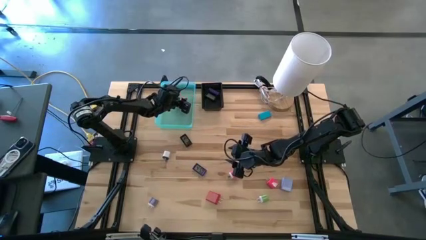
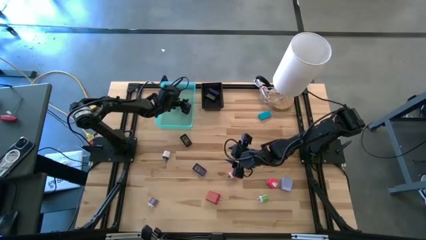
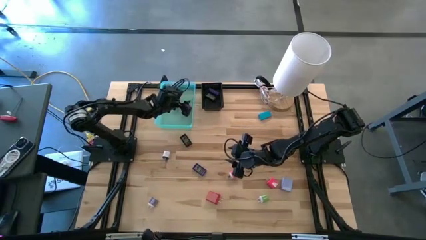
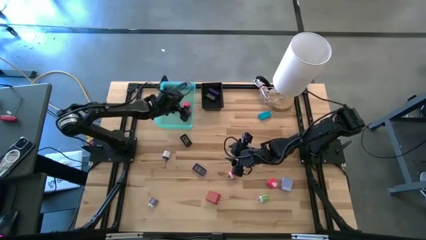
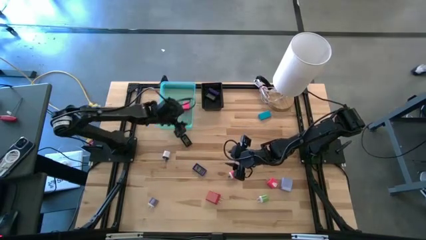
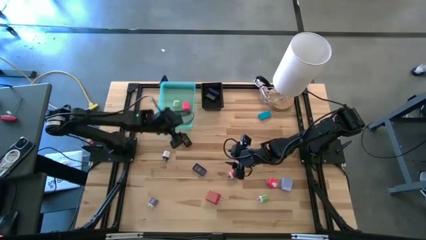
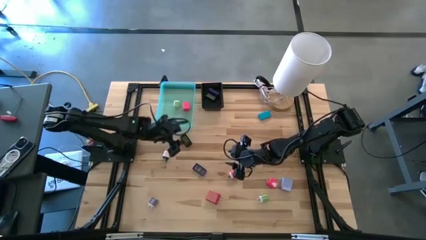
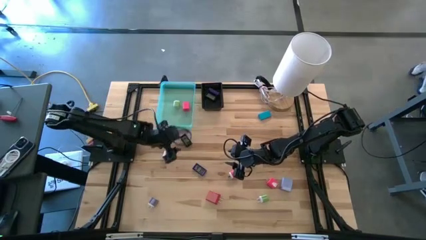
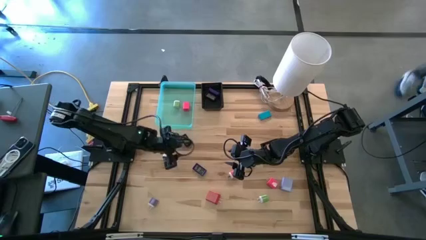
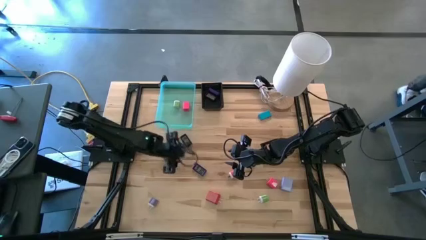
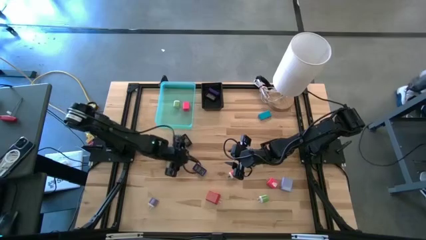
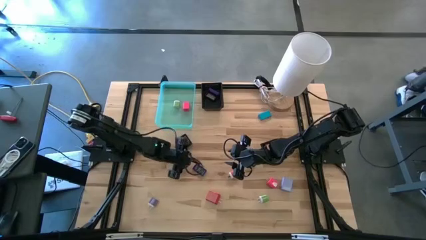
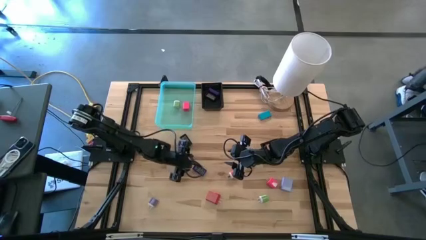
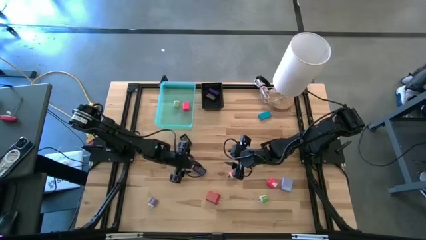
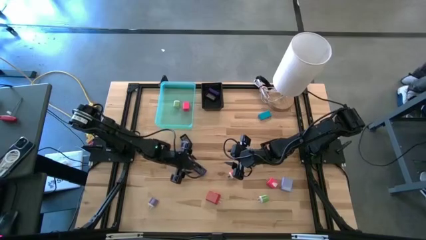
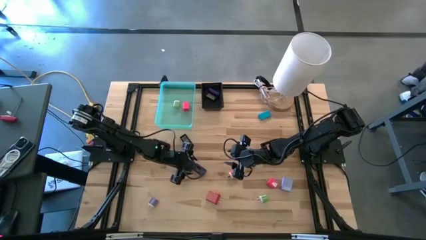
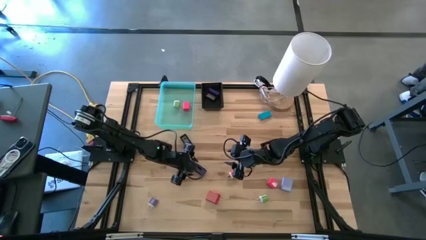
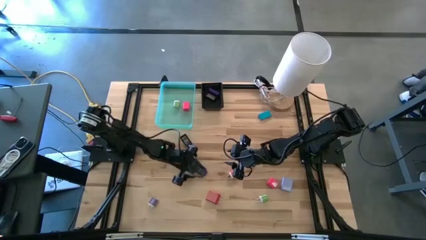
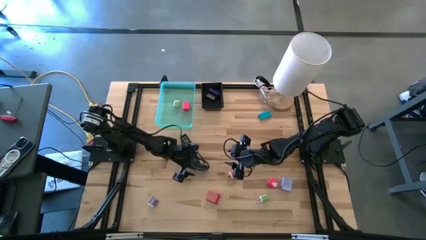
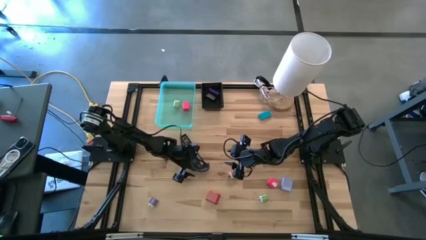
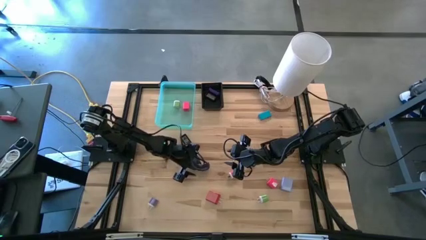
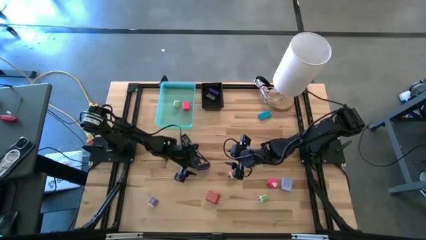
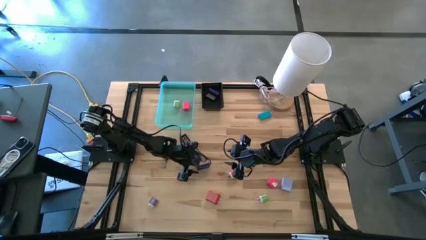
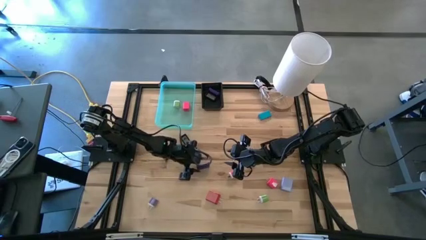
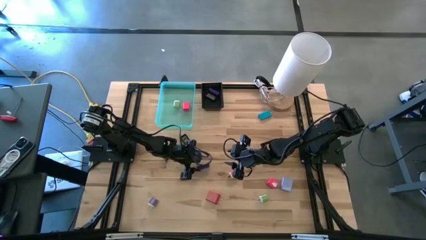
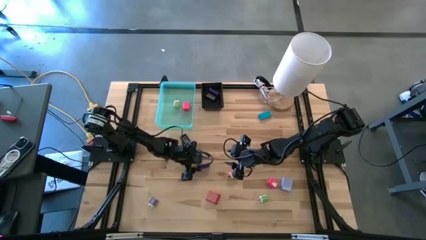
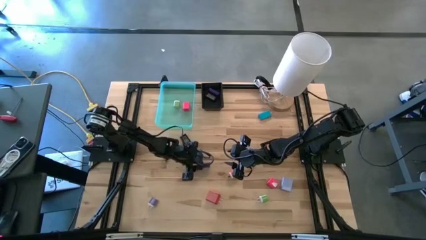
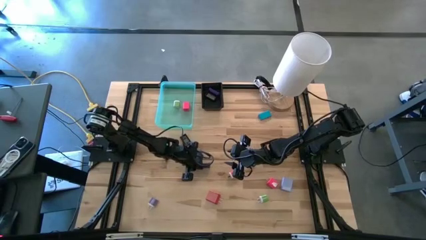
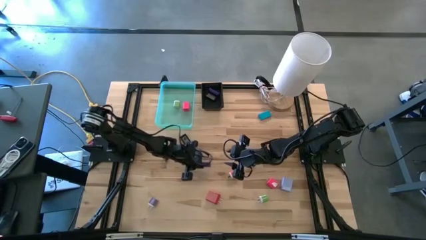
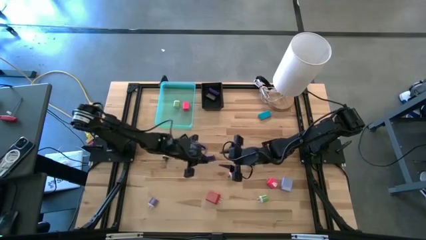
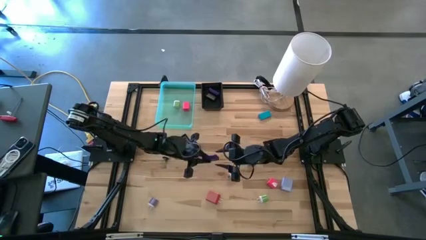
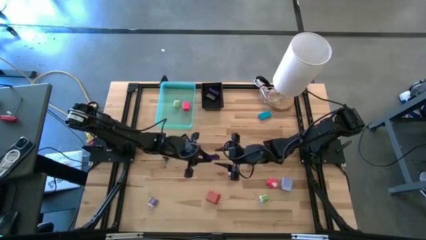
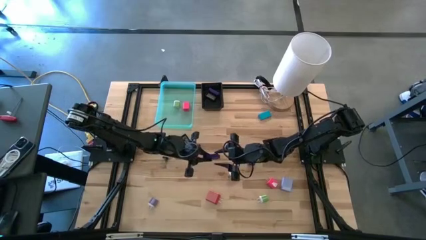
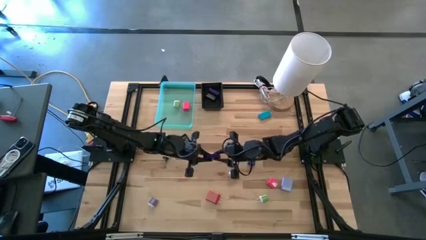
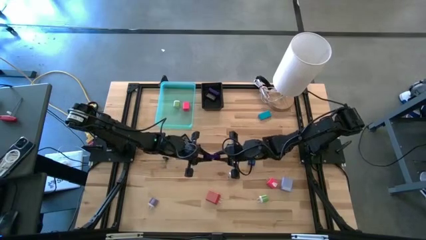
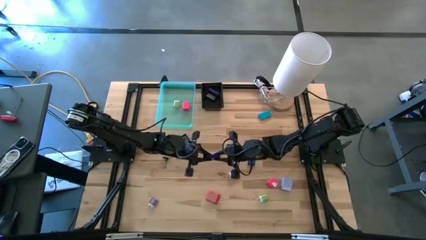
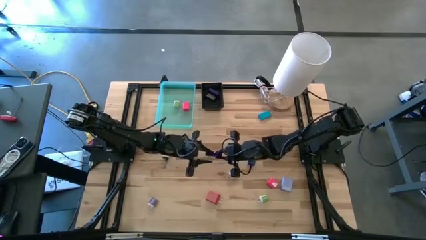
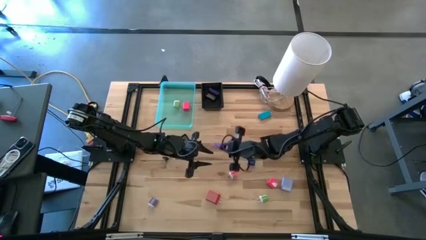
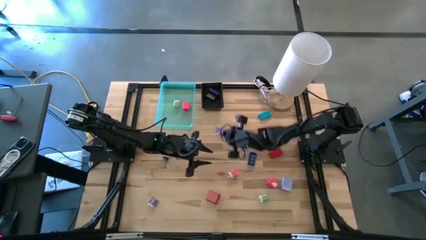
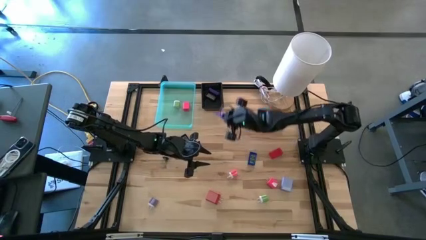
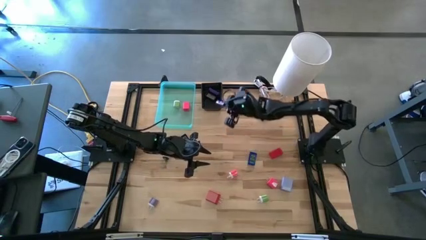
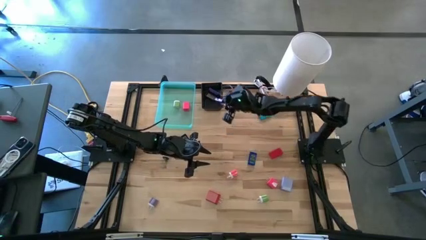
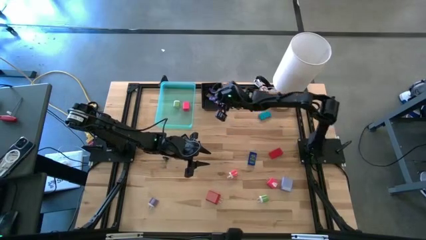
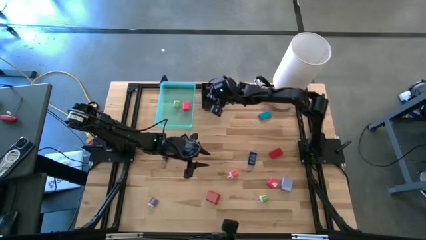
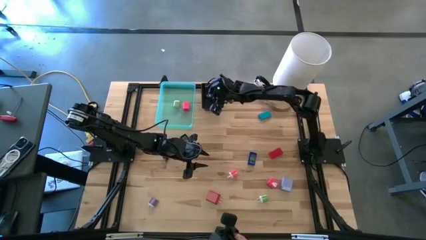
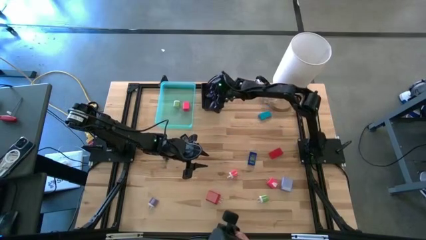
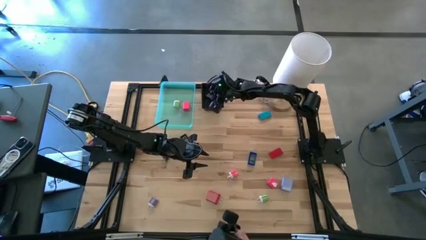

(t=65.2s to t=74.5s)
Task: Pick & Place Office items
Put the left blue timer into the black bin

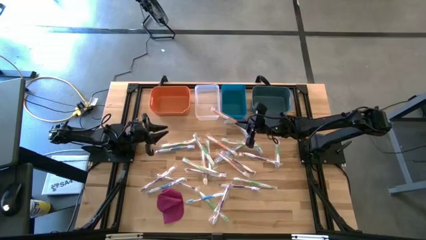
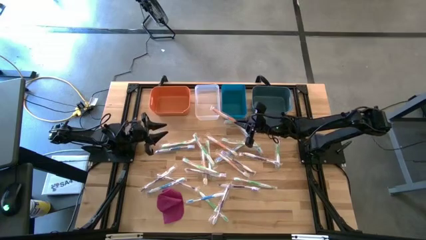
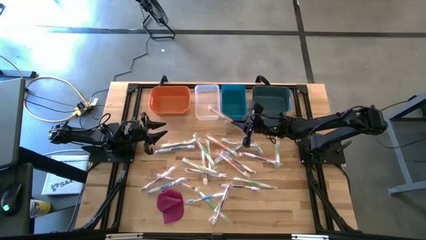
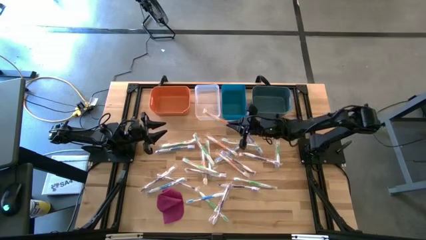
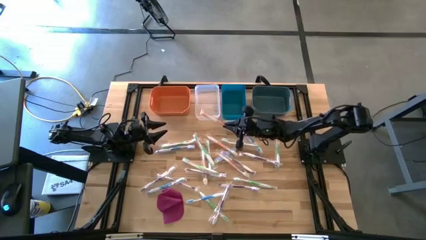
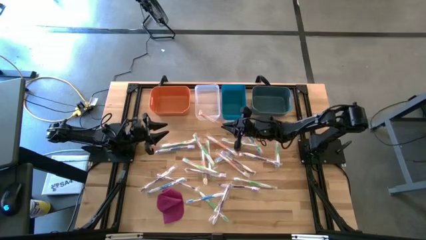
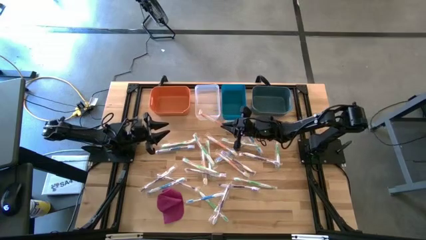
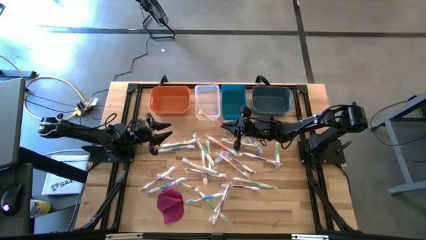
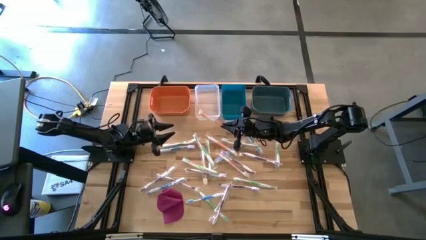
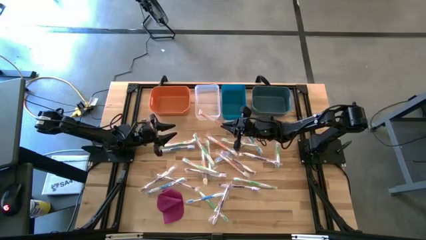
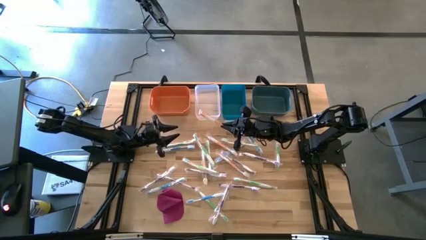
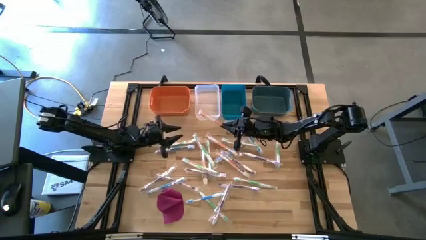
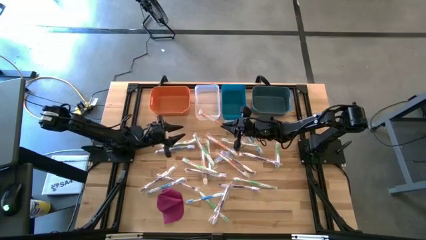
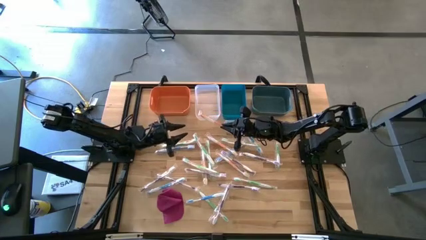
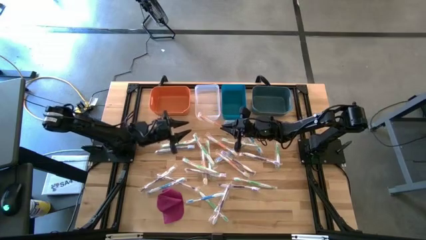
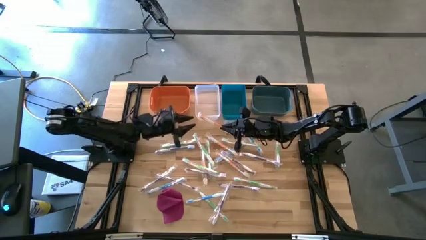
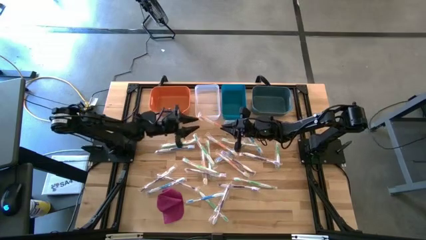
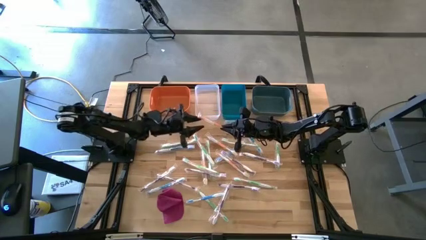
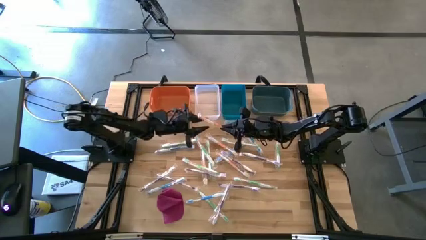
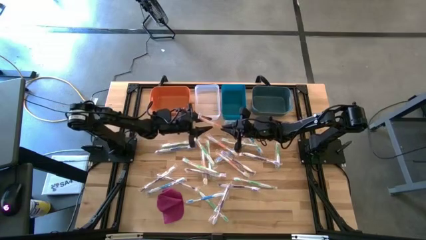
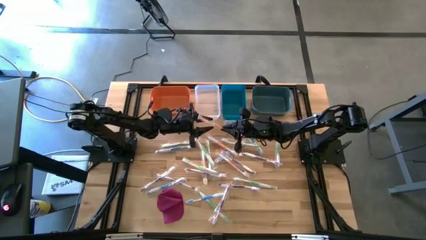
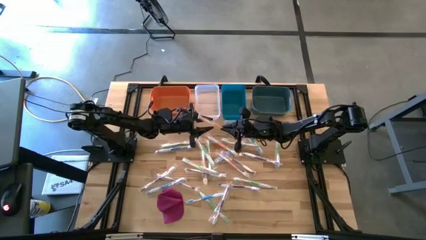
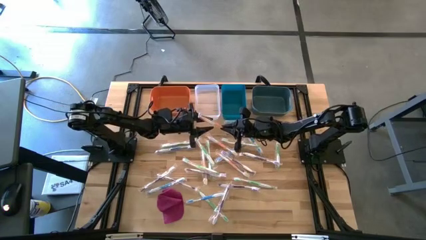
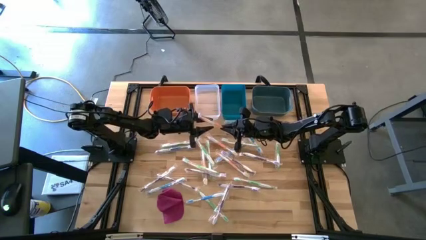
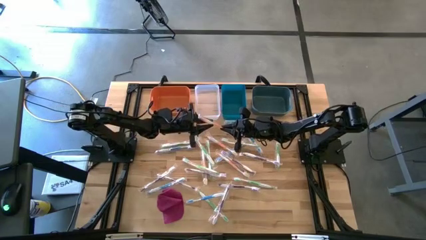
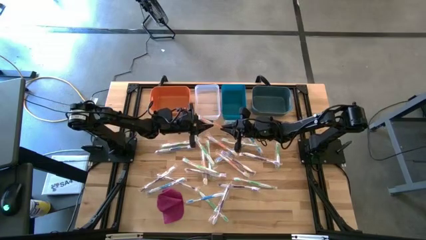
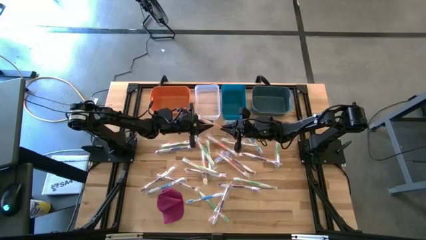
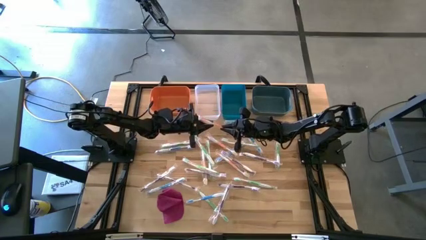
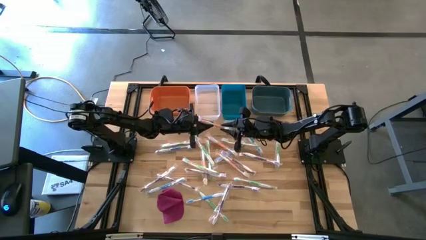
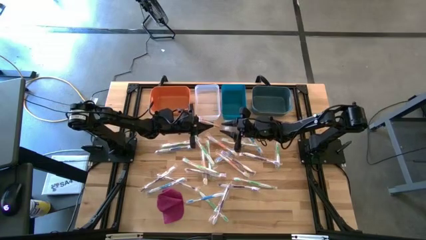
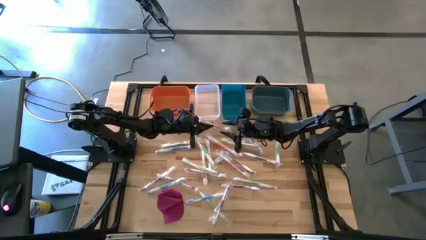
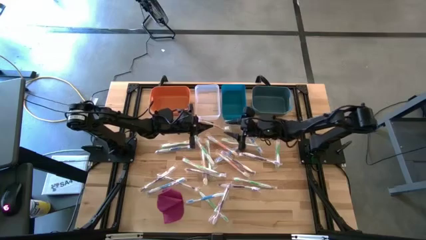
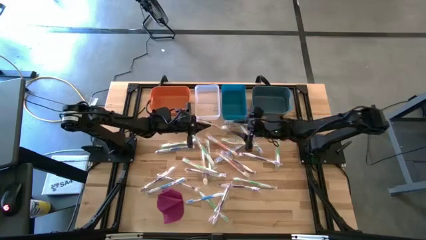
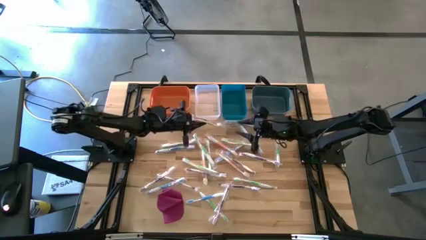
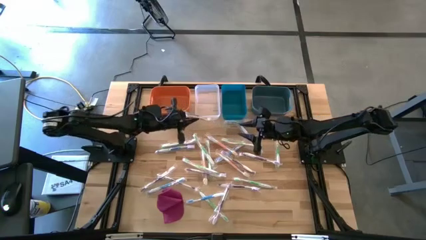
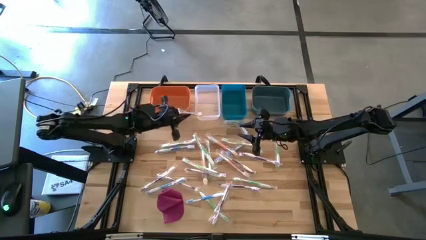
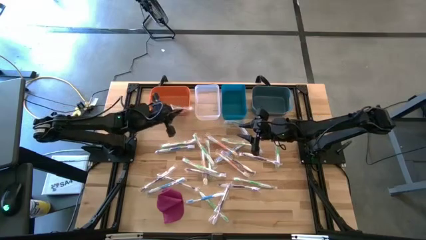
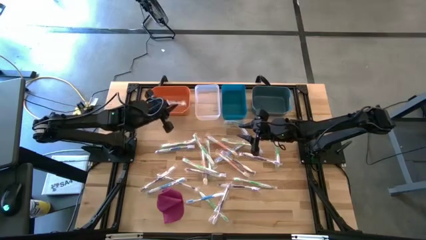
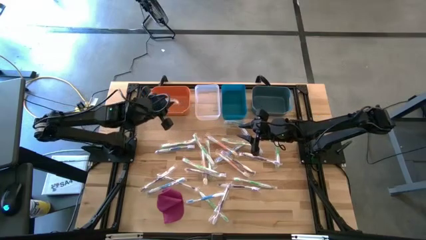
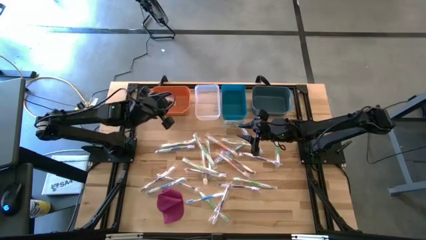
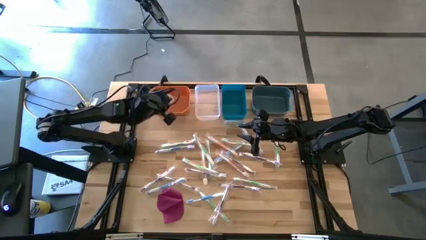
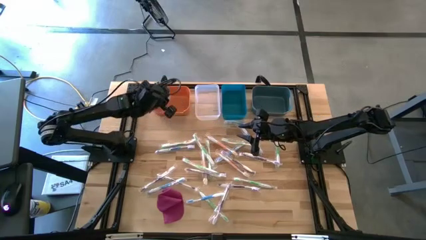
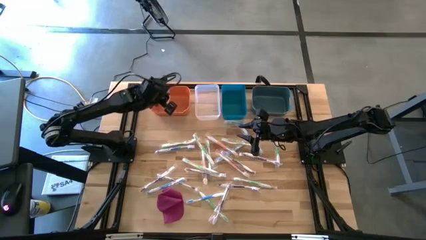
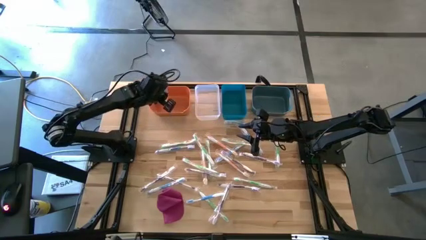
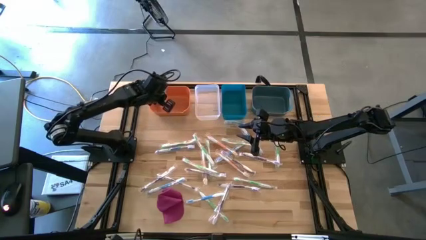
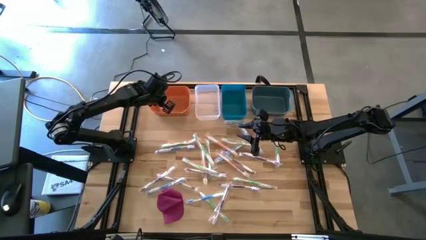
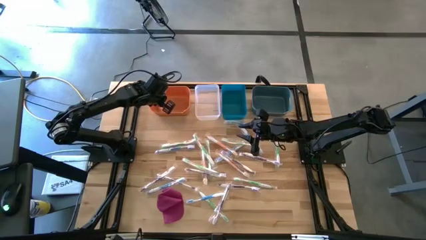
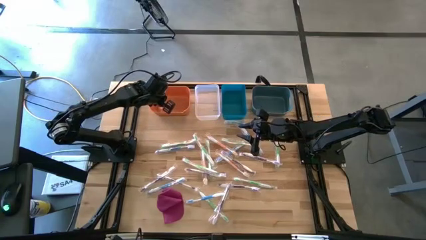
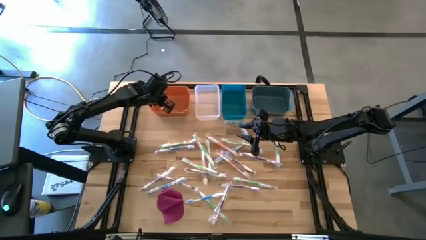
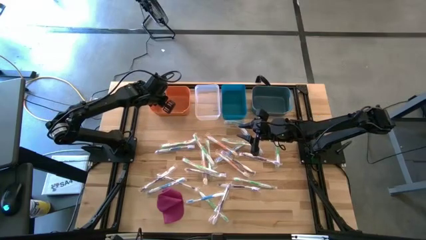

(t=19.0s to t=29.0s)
Task: Pick & Place Toothbrushes
Put the orange toothbrush into the orange bin
